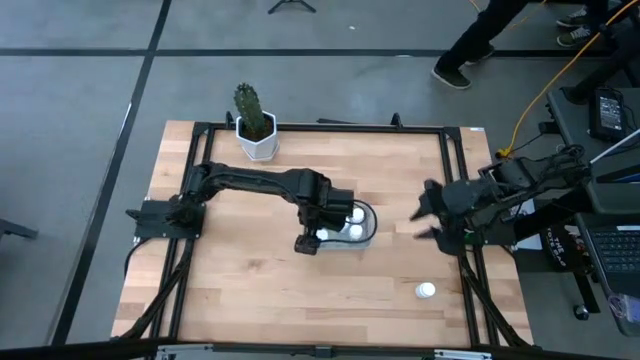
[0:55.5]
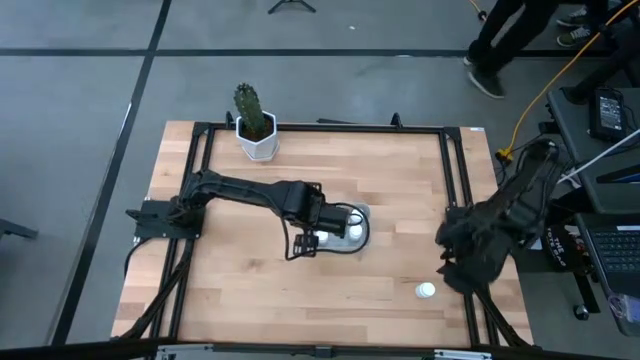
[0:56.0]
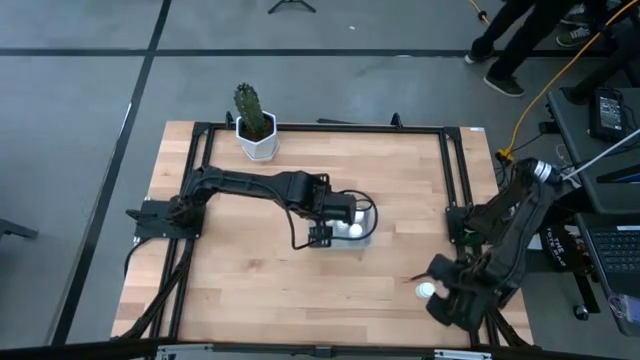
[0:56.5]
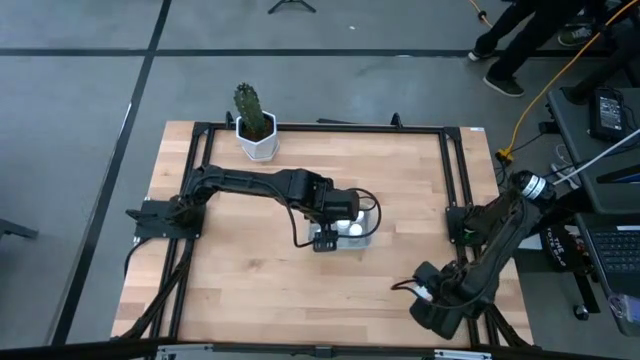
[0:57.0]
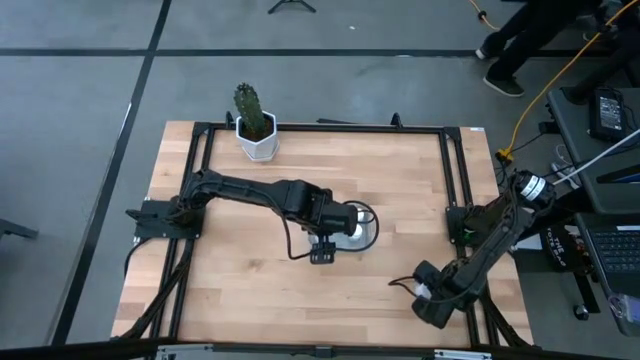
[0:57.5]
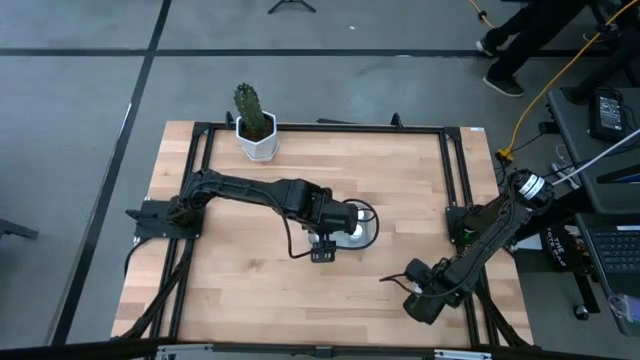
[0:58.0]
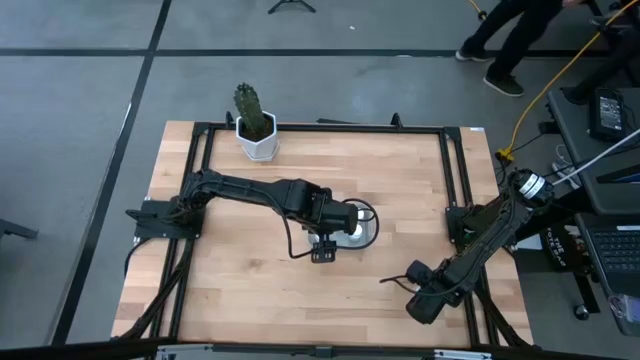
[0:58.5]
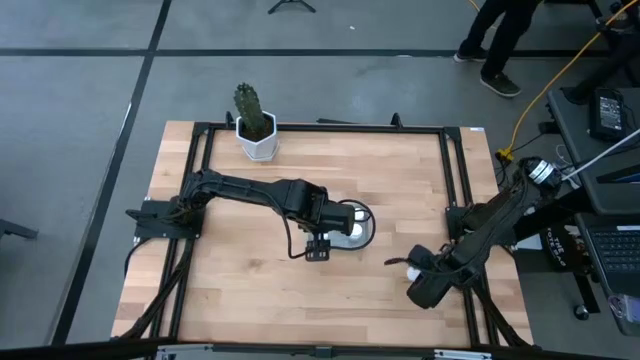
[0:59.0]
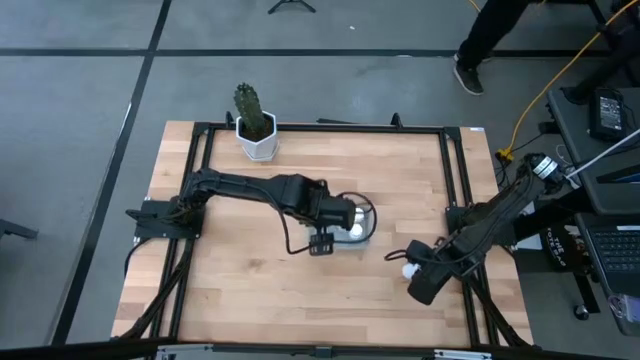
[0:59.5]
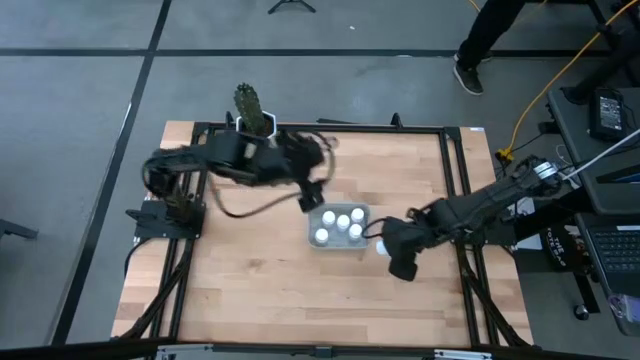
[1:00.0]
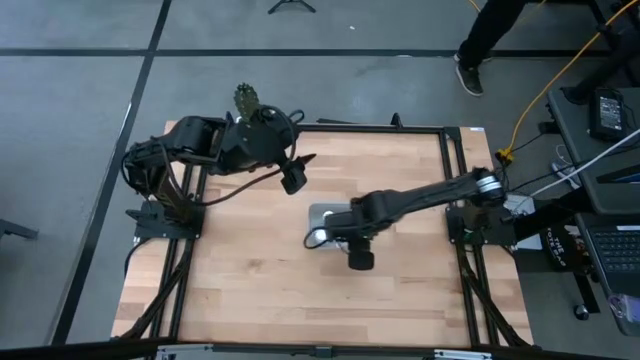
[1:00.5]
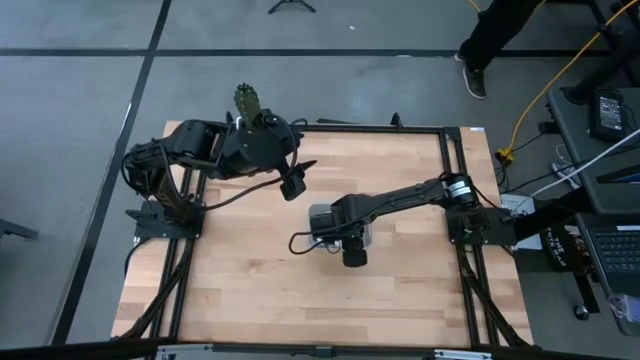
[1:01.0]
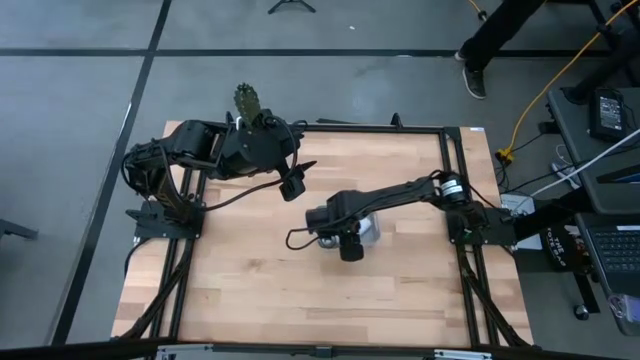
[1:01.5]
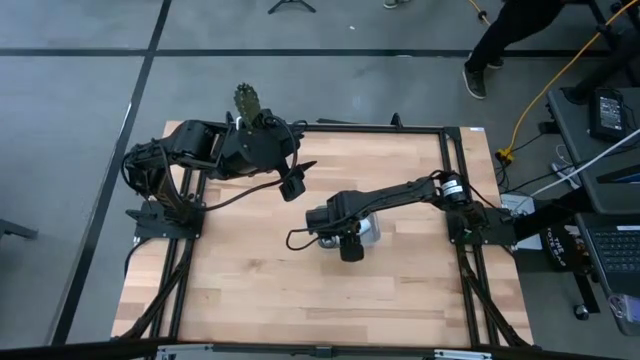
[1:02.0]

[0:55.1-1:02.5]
Task: Pick and place pill bottles into a basket
Put the white pill bottle into the gray bin

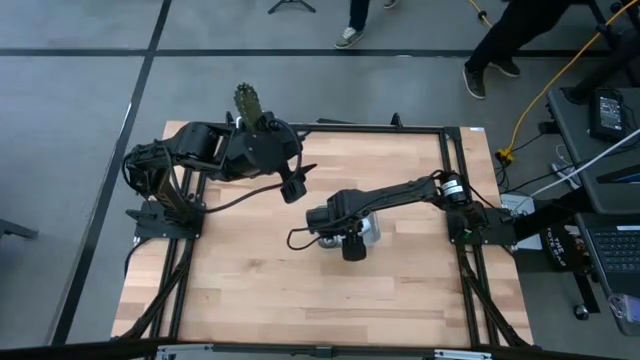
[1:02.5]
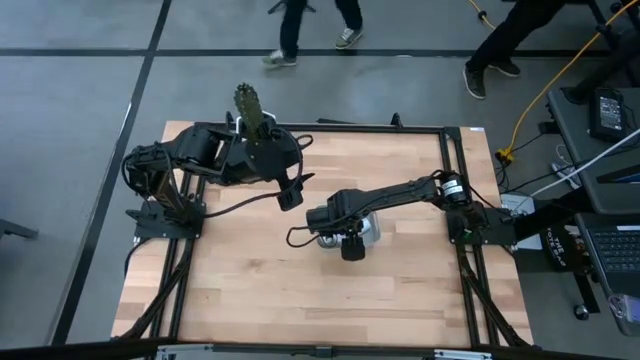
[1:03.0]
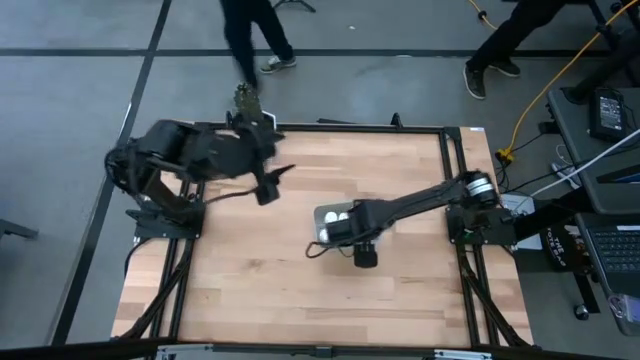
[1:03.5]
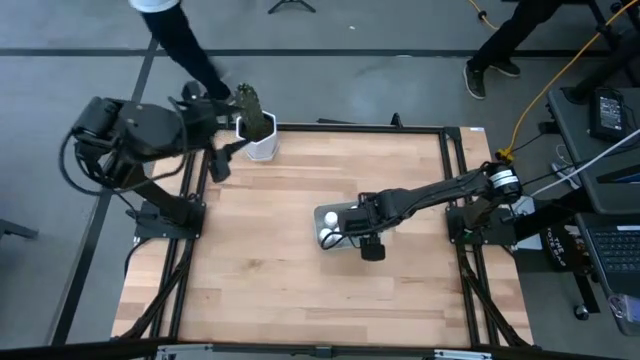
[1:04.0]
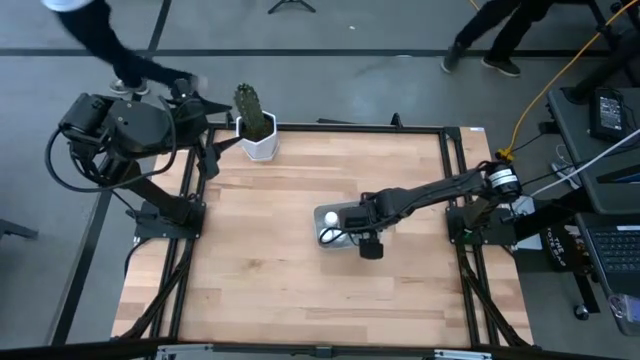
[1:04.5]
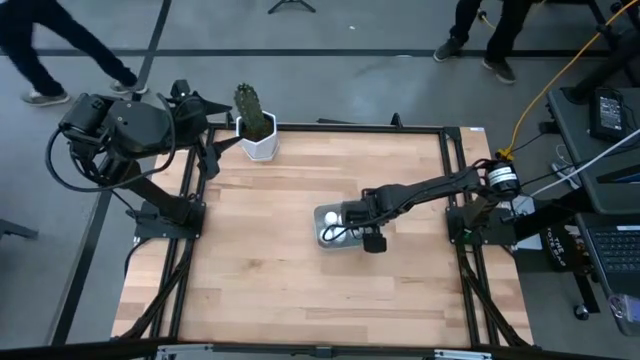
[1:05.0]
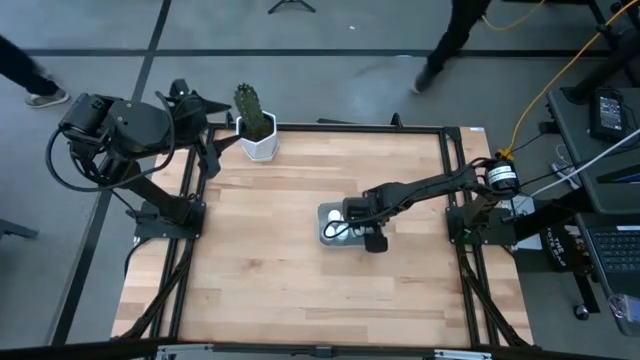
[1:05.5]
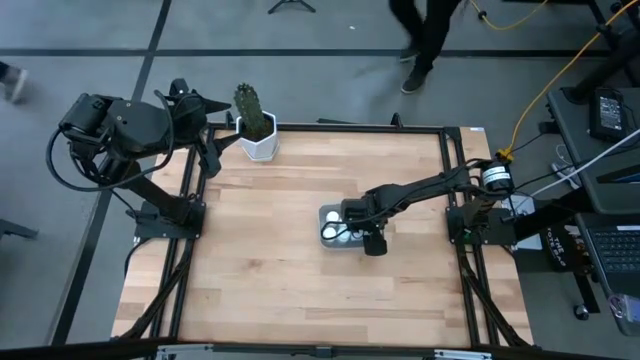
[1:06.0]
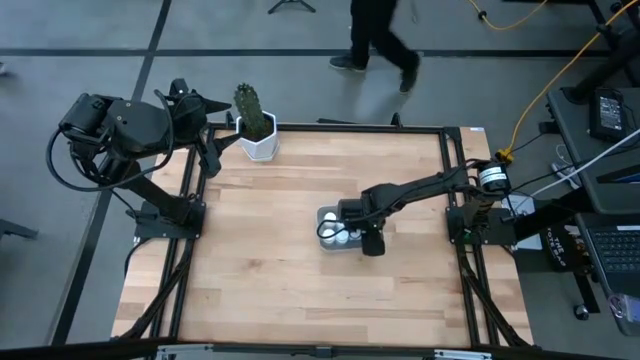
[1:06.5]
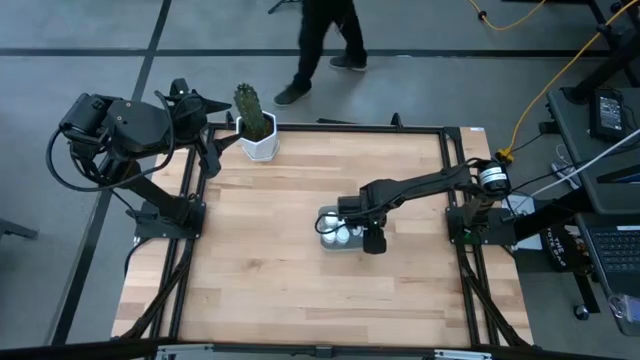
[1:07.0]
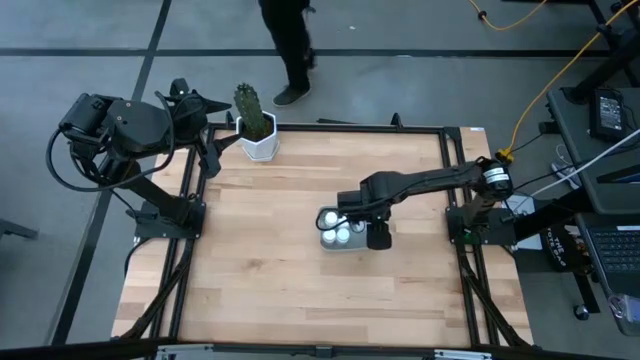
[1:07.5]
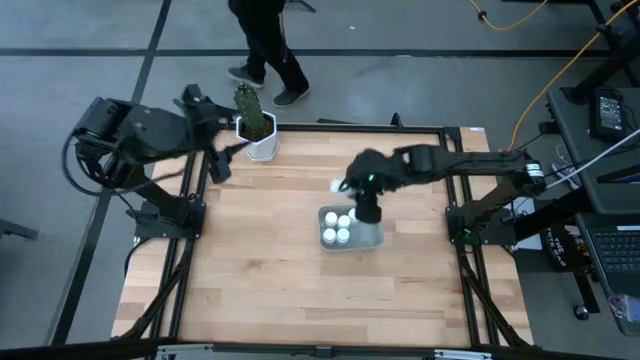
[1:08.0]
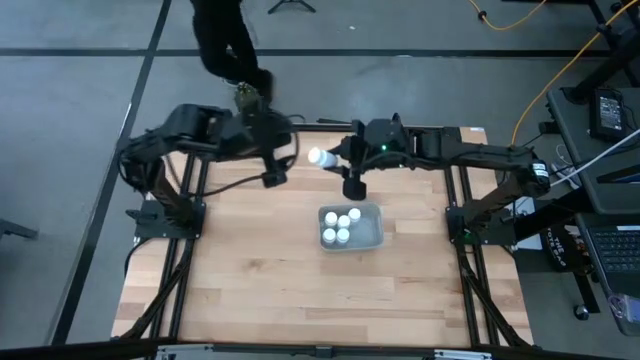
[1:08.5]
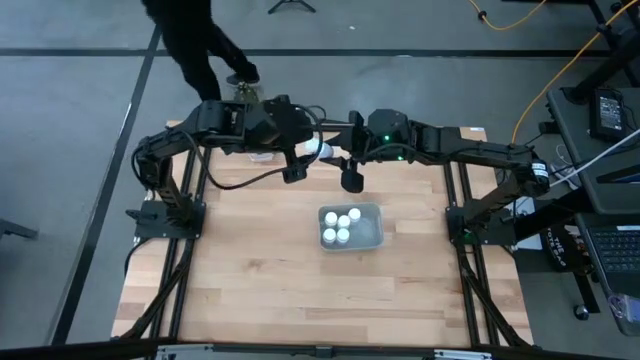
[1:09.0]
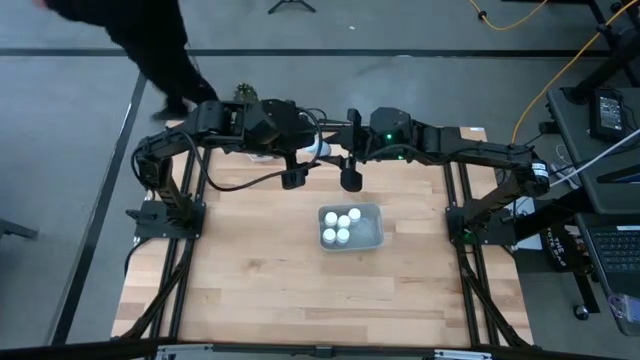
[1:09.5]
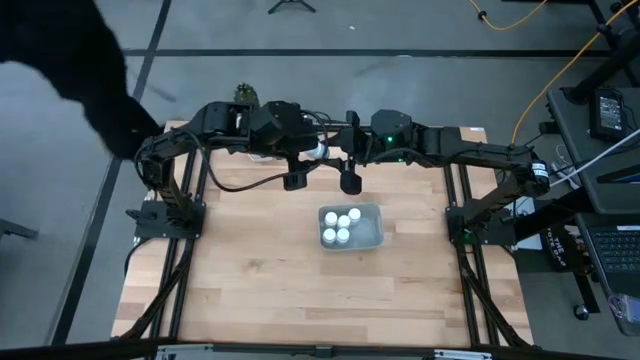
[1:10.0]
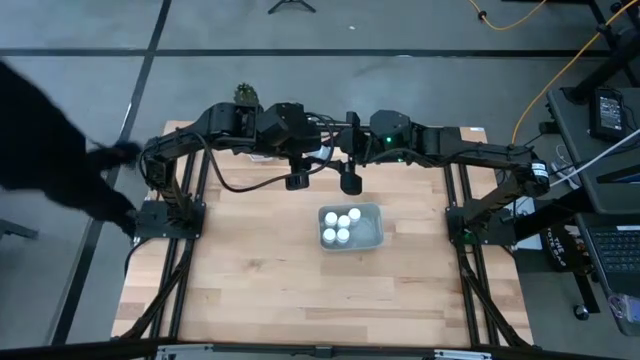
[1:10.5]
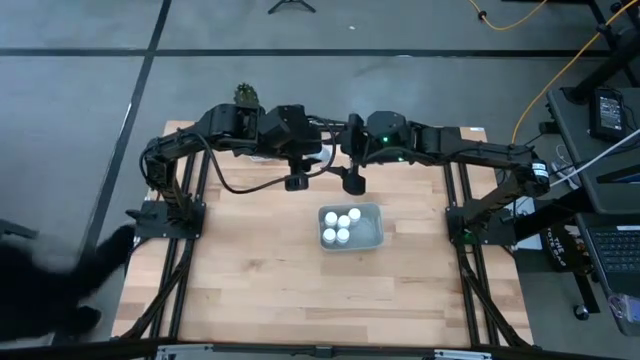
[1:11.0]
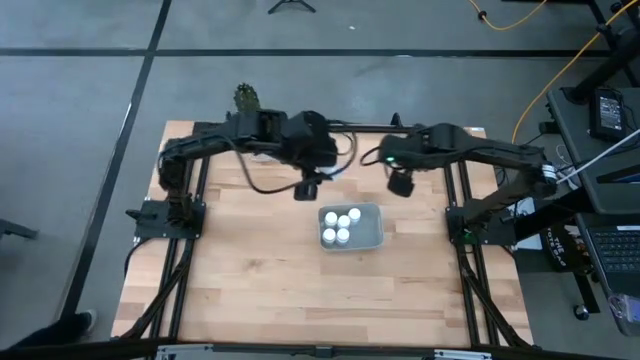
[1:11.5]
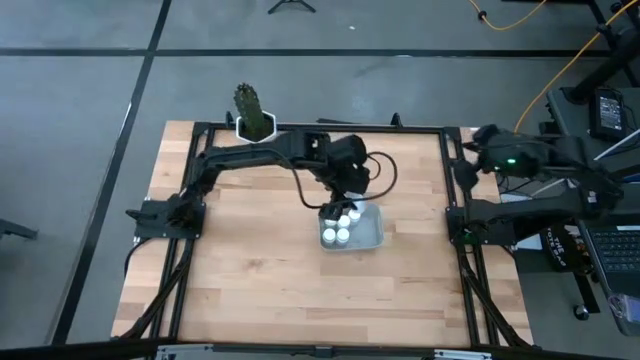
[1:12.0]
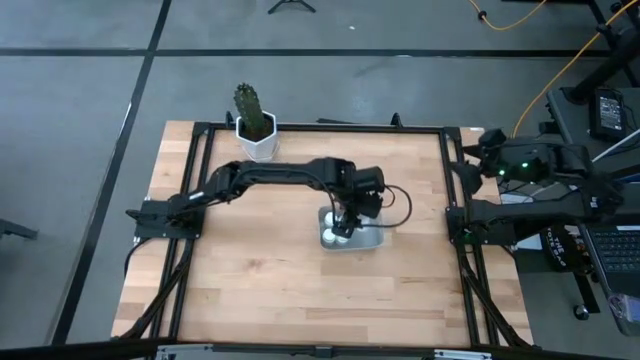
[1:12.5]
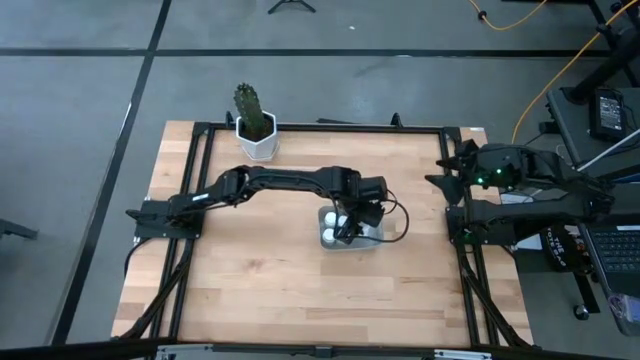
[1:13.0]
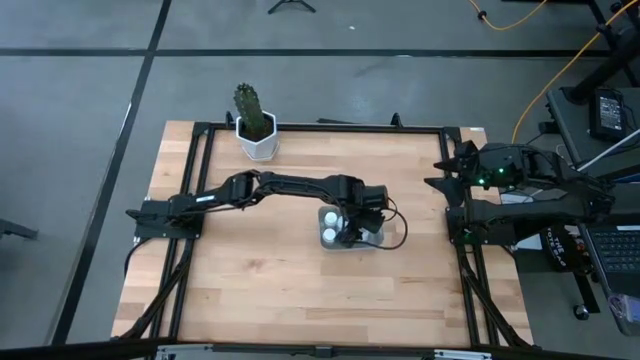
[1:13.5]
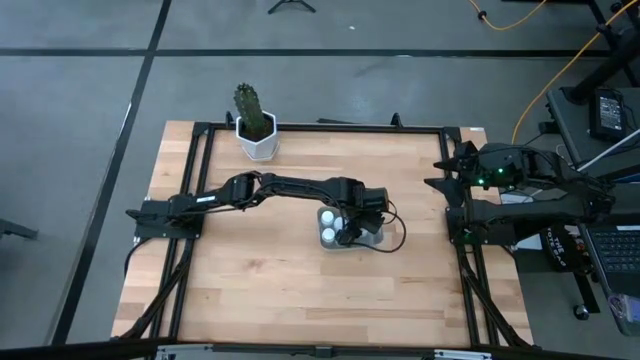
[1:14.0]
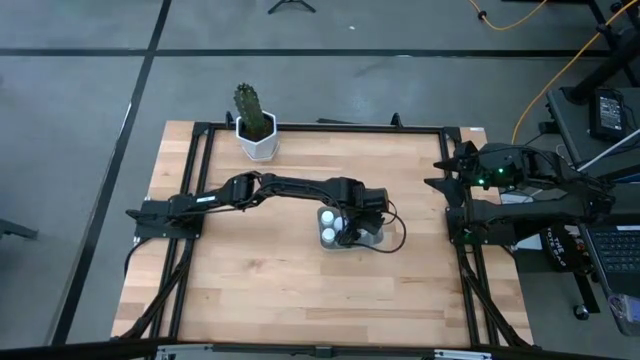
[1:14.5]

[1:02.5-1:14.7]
Adjust the white pill bottle in the gray bin
